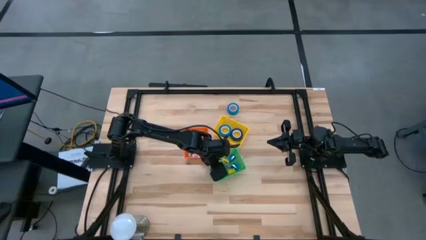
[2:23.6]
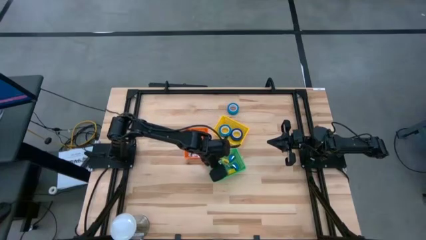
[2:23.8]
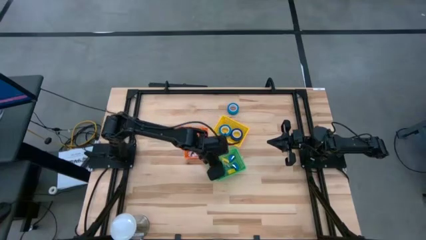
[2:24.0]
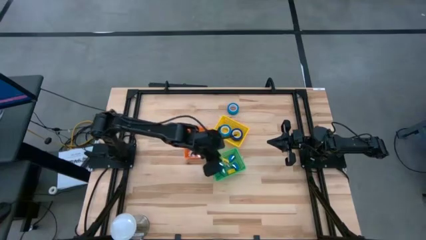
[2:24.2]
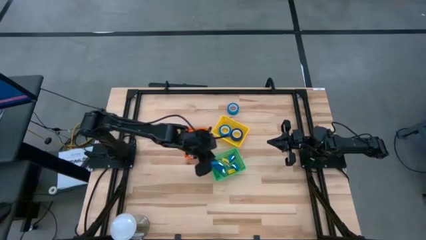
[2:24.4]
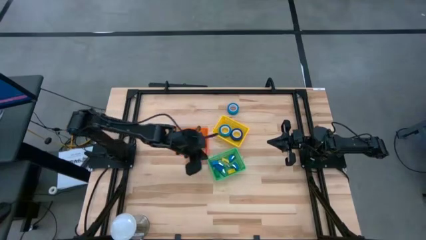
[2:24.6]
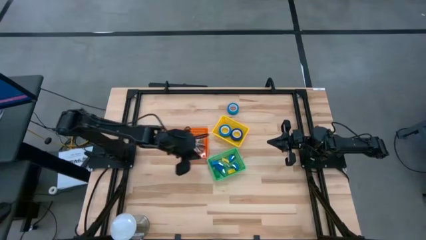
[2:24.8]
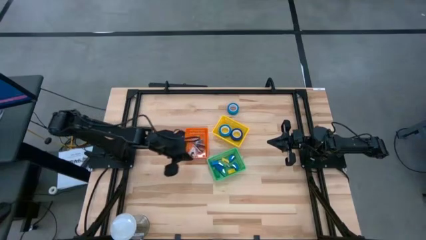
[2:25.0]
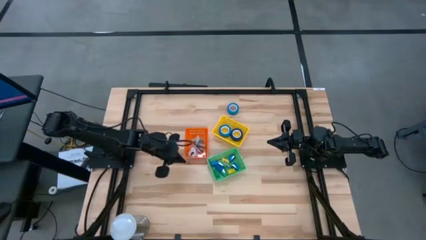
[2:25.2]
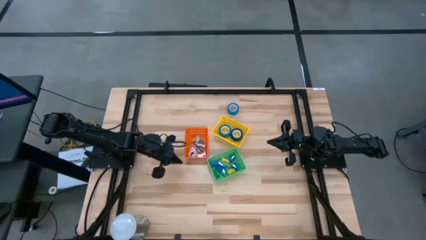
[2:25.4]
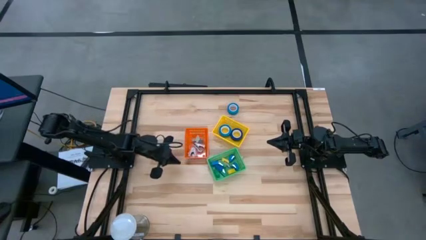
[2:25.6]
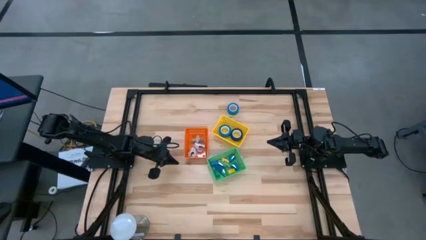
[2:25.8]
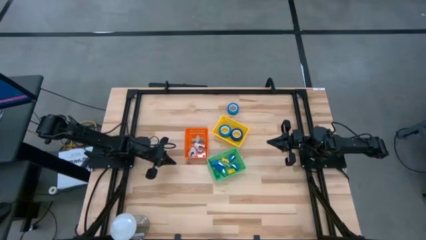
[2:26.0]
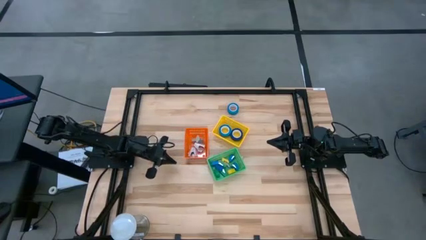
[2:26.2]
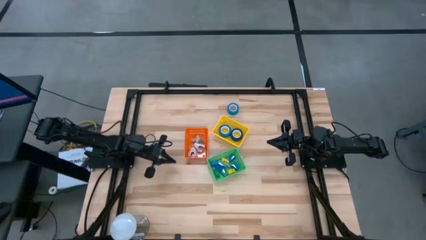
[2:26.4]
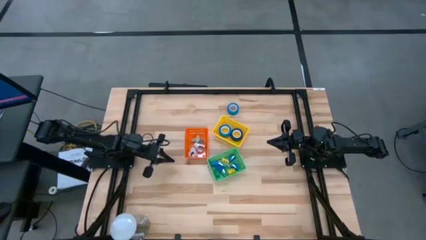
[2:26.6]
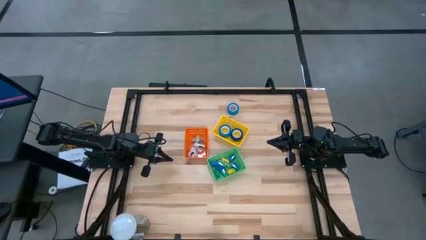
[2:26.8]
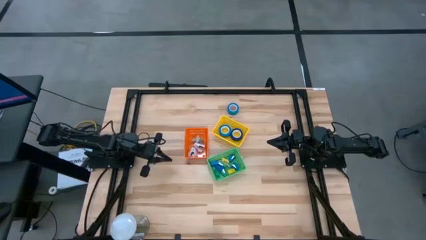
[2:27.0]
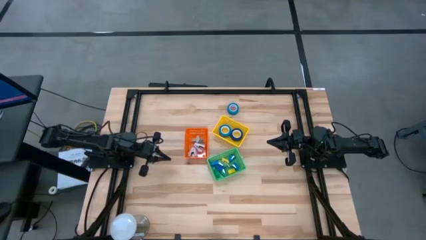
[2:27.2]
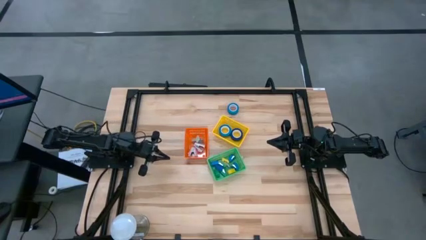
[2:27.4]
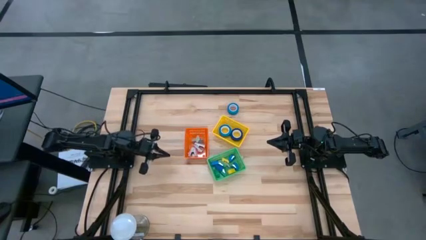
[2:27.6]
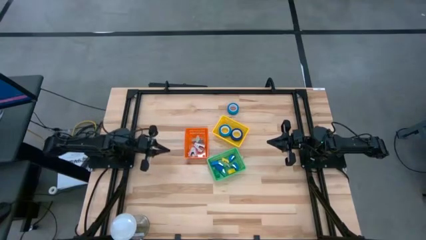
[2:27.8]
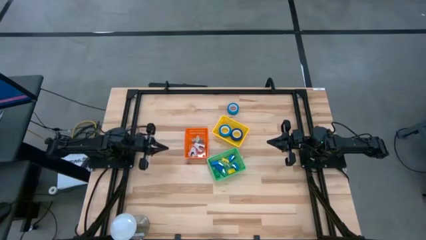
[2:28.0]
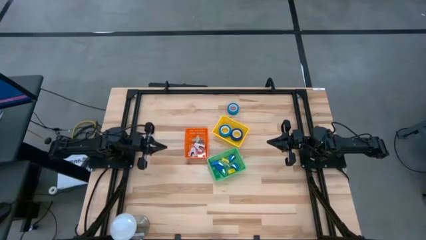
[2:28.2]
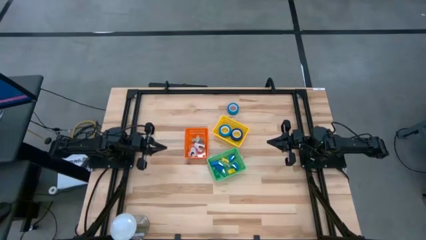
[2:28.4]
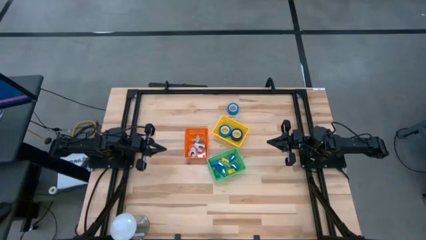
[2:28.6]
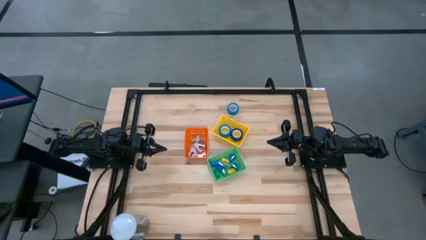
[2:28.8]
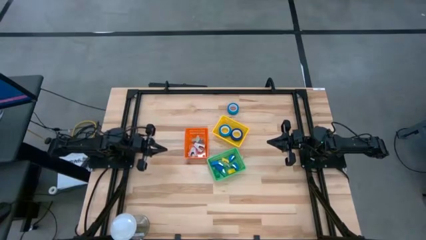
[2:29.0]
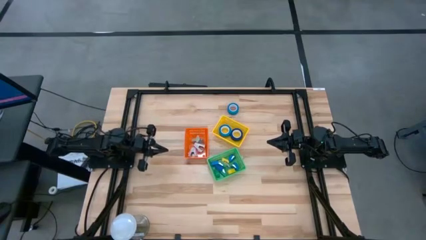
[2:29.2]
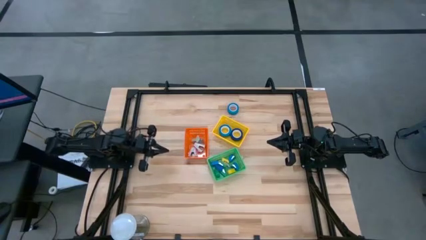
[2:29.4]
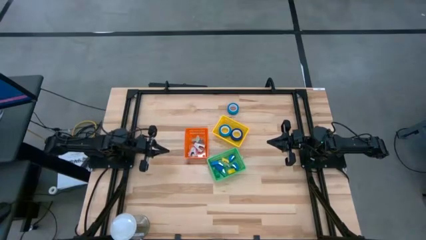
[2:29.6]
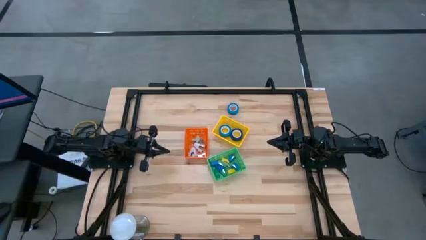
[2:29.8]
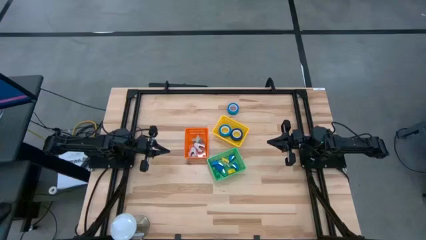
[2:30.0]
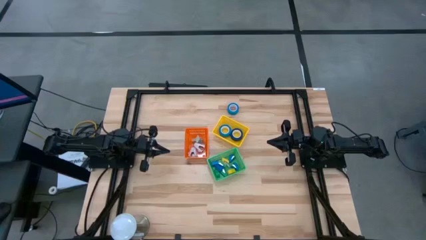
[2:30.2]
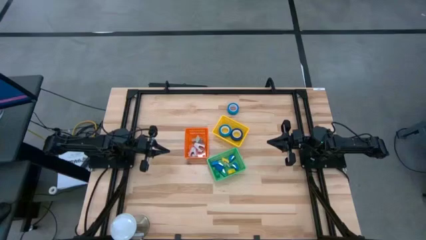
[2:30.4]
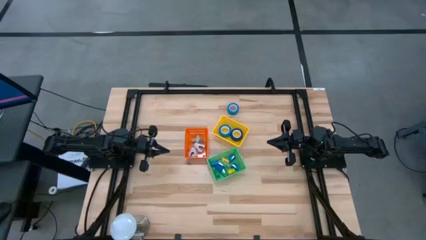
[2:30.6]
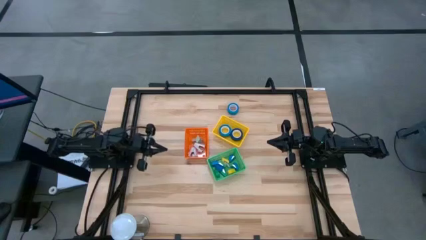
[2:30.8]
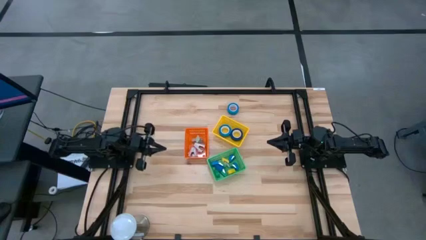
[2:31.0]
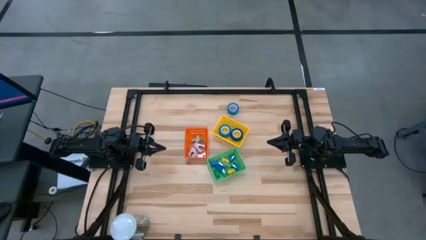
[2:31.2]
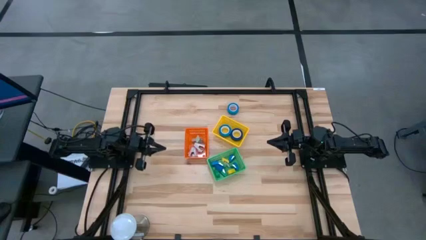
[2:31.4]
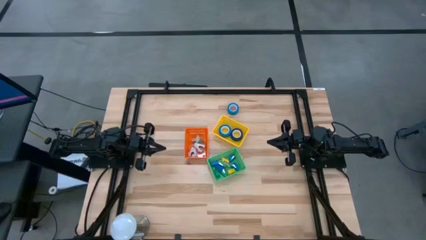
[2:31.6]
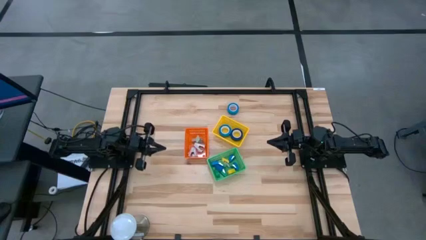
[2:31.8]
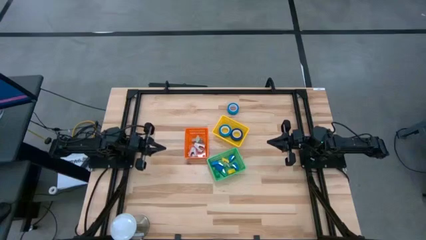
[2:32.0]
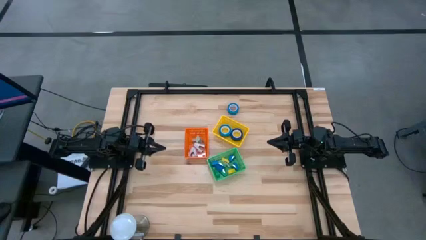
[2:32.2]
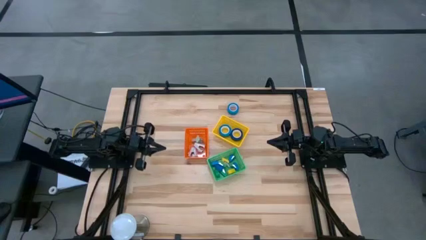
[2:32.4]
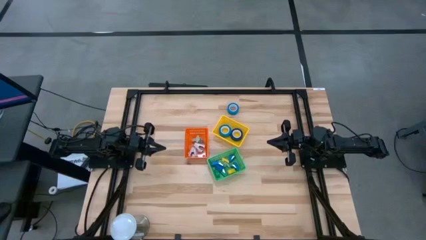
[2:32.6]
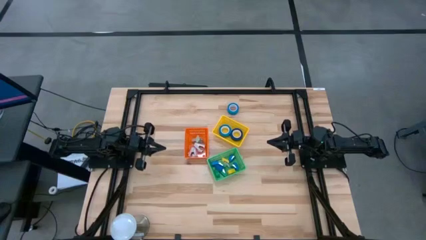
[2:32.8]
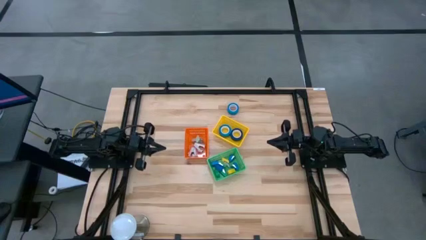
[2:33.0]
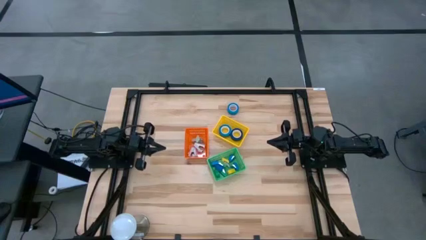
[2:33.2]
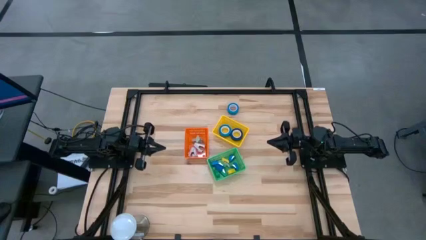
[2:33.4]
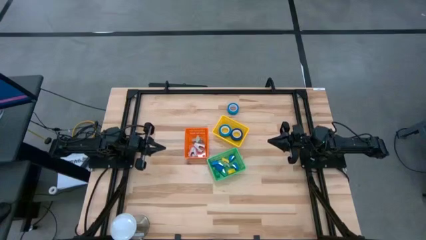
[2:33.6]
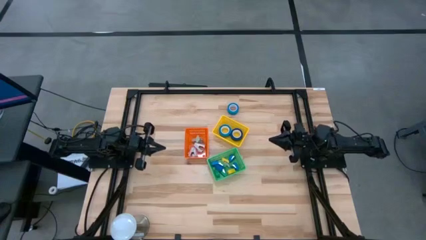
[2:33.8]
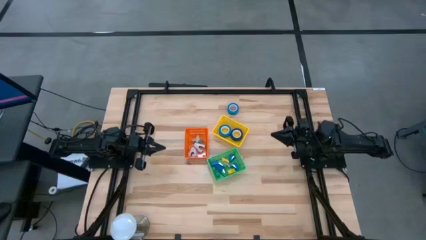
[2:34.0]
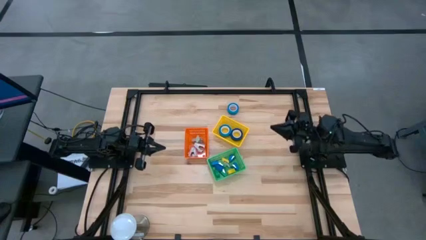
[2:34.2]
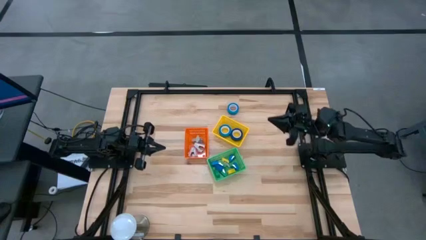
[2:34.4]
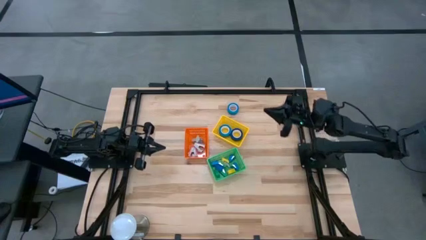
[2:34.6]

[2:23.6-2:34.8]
Task: Pick and place Stapler, Stapler remover, tape
Put the blue tape into the yellow bin
